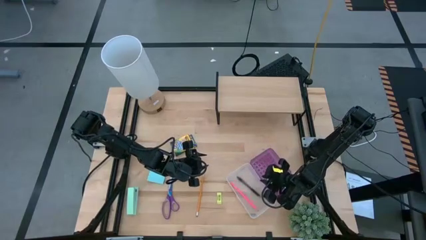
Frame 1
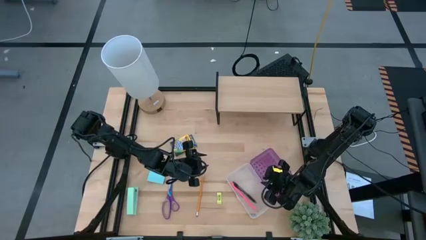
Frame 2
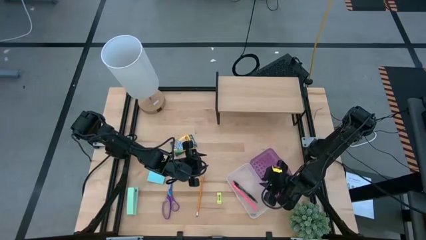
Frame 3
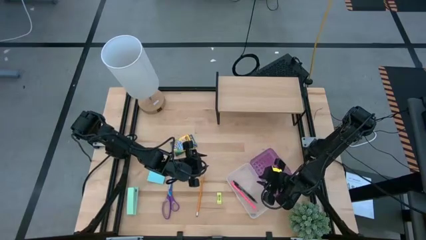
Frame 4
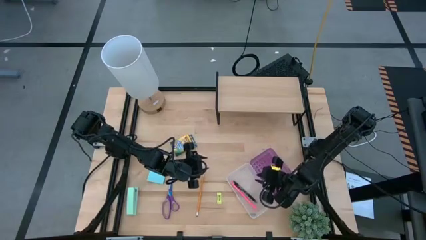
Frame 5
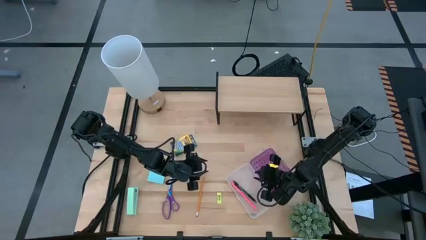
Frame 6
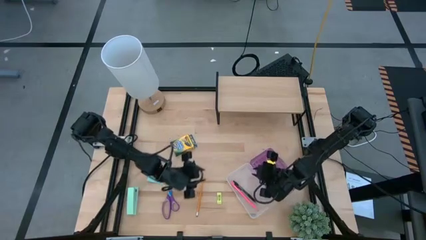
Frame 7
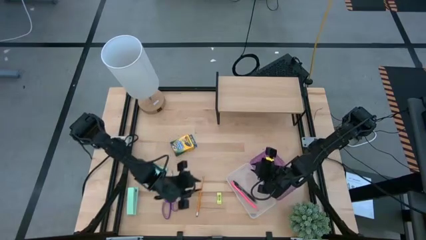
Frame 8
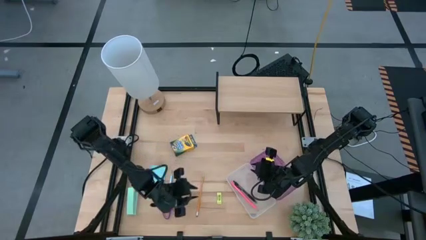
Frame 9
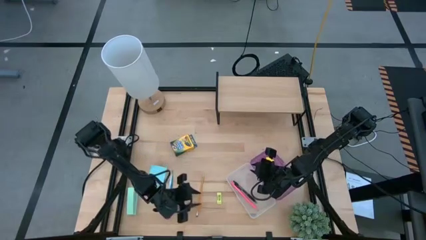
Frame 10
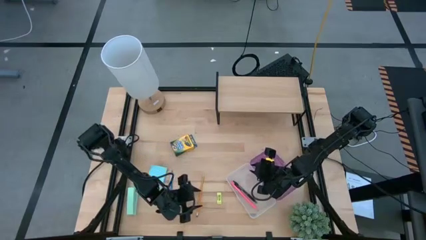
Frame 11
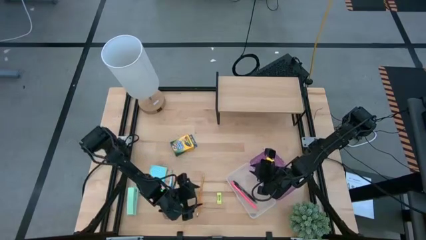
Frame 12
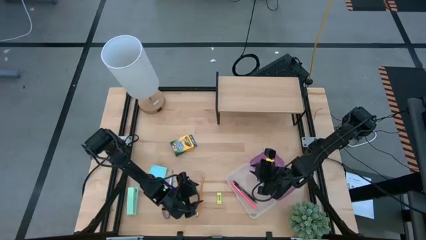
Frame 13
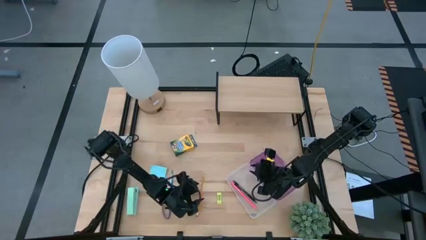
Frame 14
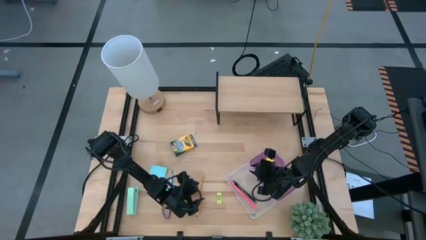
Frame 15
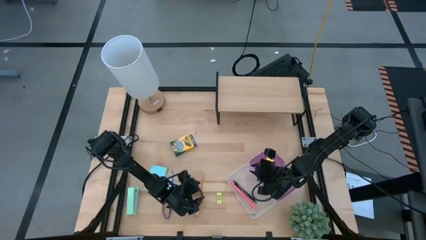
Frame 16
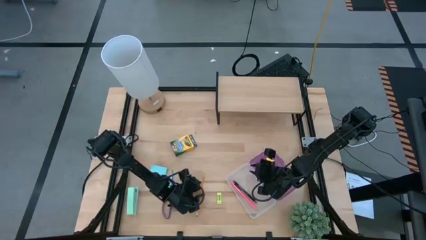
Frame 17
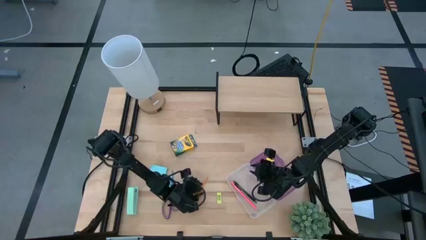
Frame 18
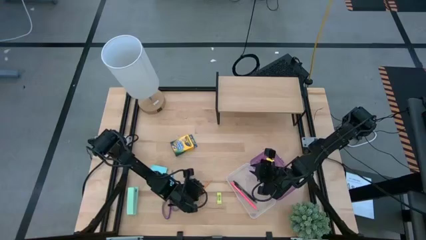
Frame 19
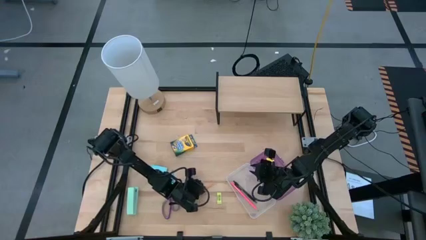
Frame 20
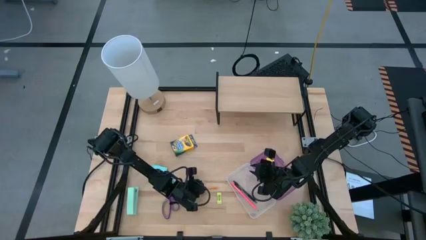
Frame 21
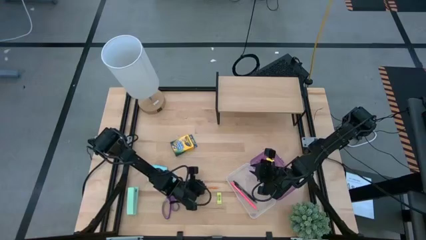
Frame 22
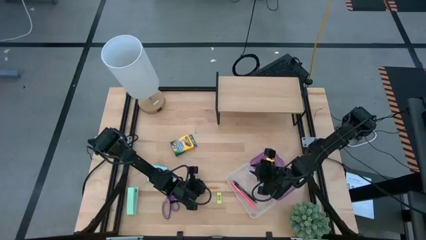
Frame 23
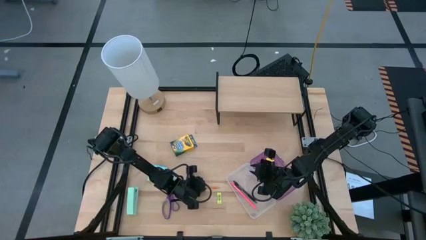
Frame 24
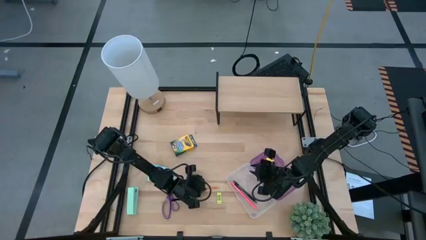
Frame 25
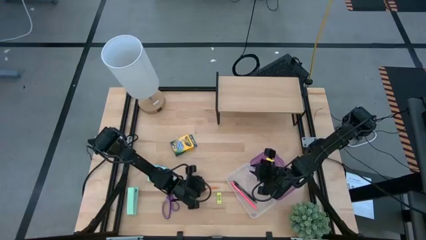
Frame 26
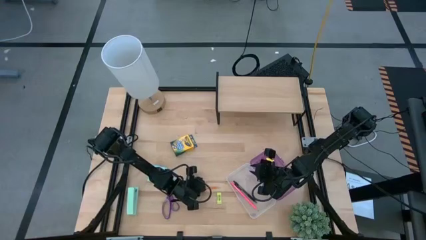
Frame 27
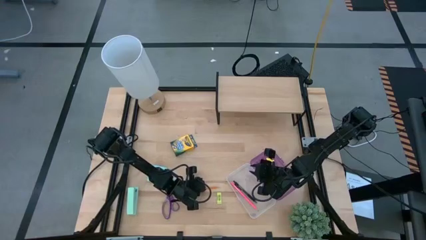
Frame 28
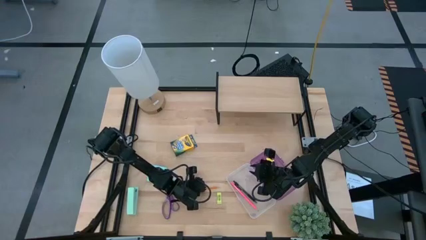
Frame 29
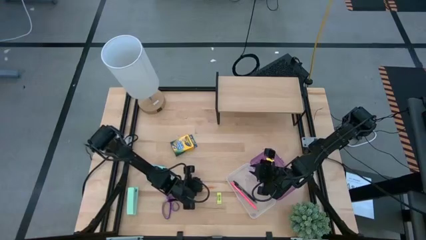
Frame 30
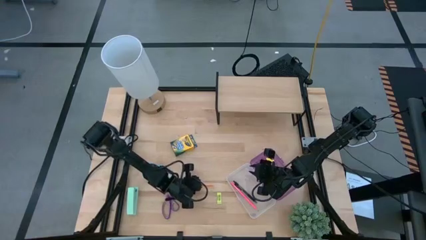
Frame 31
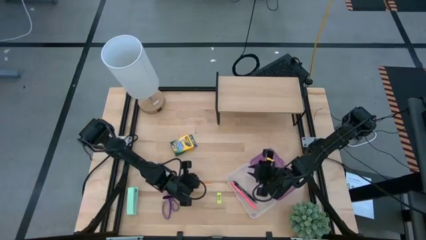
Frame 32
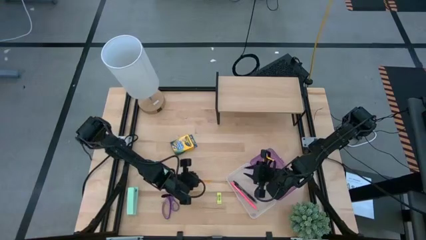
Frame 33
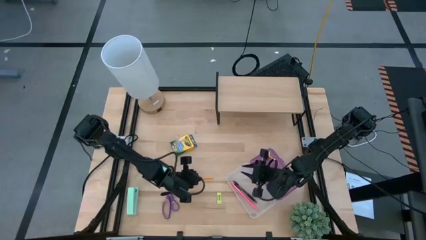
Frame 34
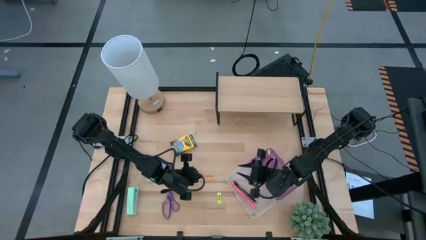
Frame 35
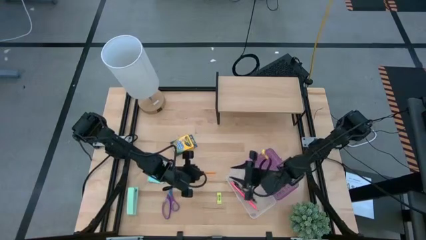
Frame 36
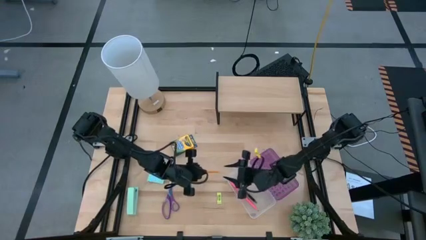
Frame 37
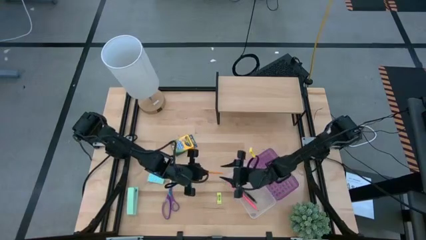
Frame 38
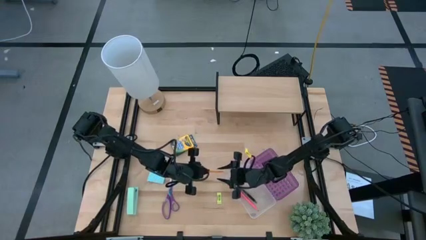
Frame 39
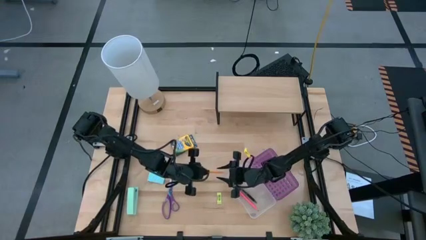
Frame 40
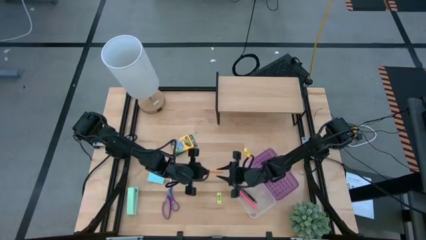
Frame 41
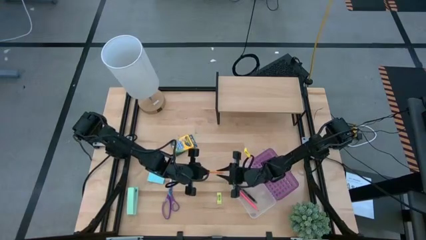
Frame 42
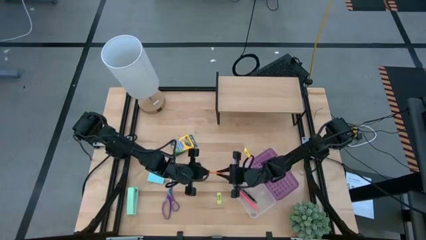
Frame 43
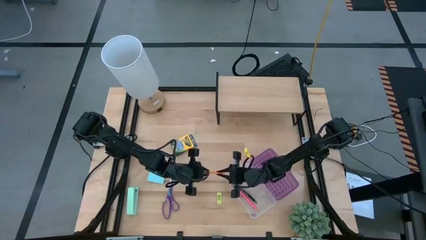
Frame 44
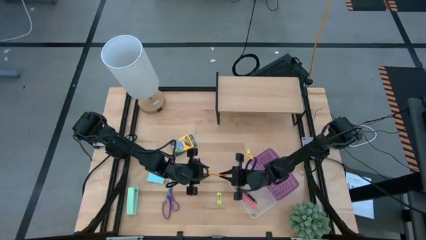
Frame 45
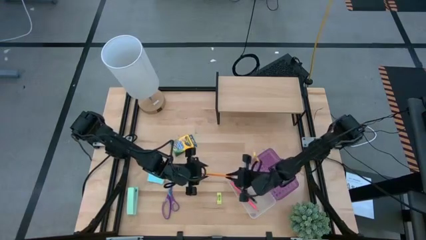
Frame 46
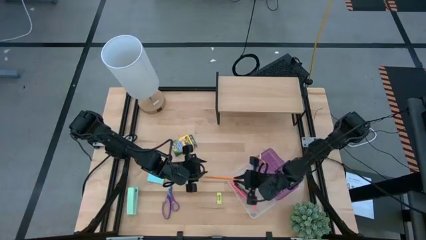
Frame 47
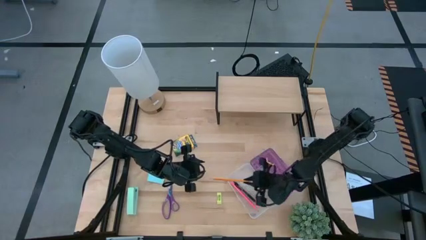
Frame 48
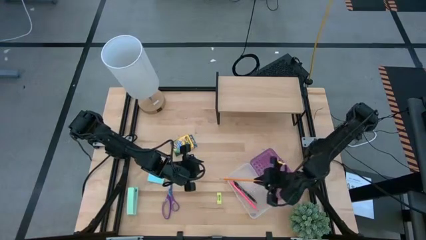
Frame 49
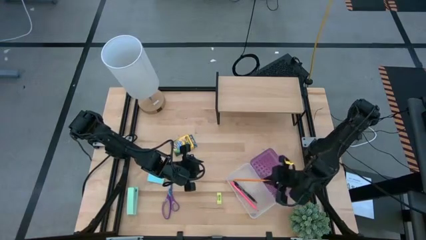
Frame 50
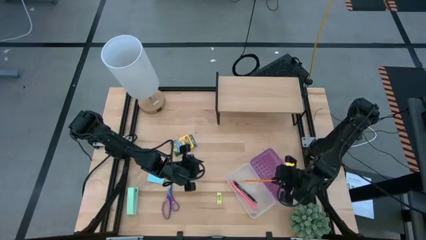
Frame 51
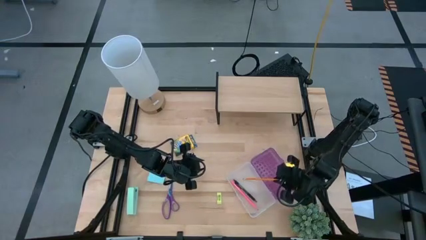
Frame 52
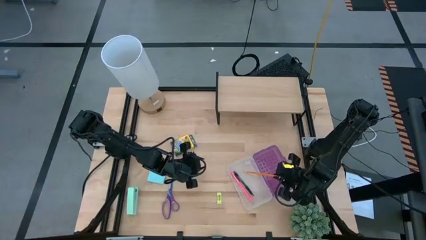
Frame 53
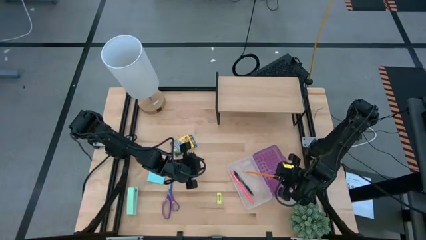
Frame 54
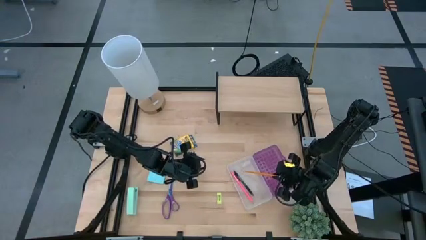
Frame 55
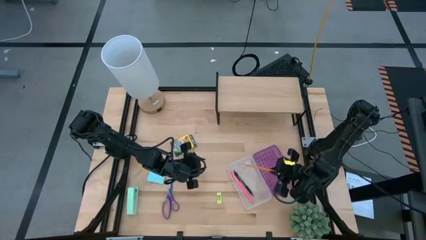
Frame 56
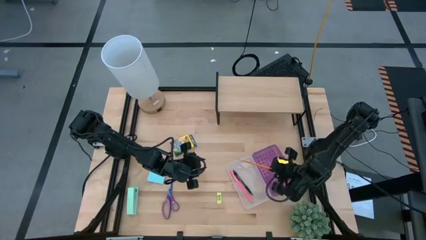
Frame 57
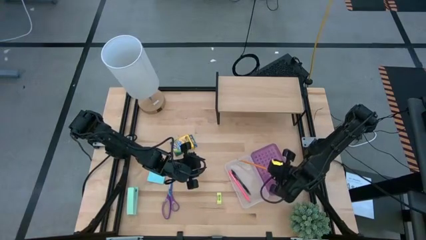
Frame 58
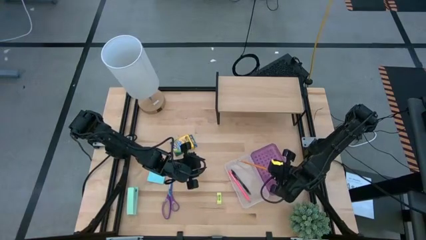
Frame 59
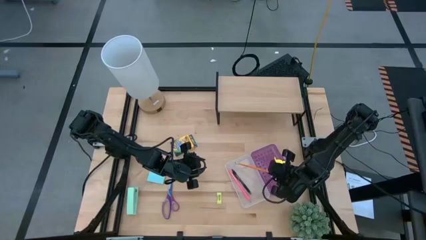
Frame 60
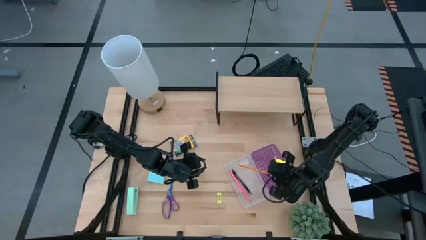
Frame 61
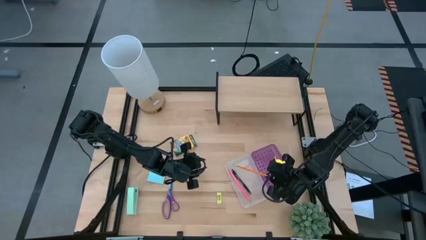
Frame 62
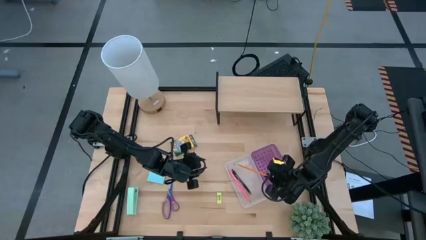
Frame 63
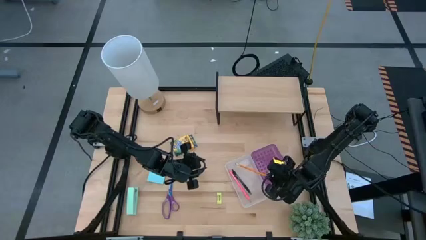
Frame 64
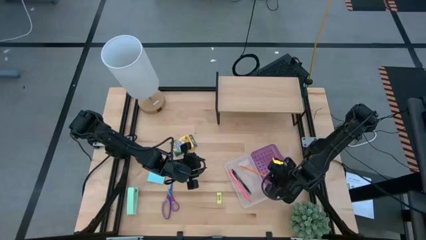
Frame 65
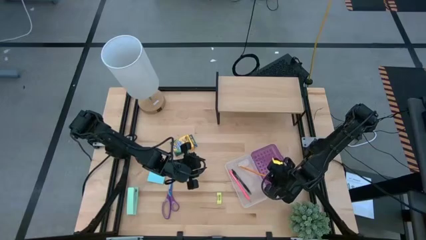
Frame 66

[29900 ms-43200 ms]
Task: Pack school essentials
Put the orange pencil into the purple supply box
